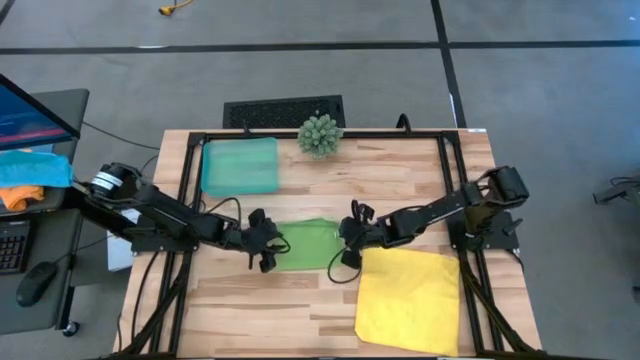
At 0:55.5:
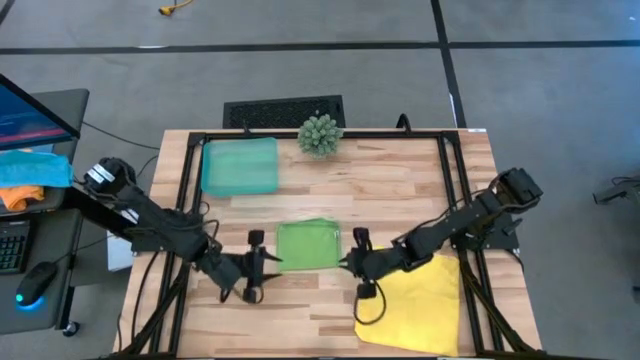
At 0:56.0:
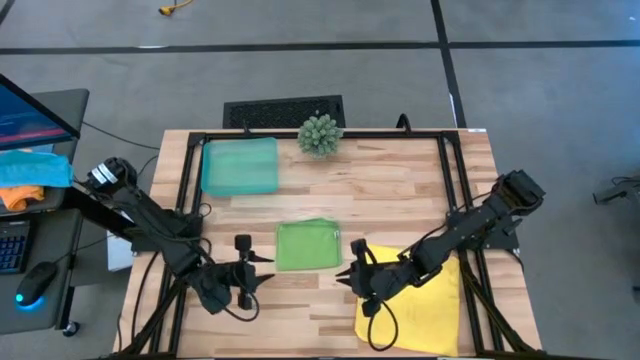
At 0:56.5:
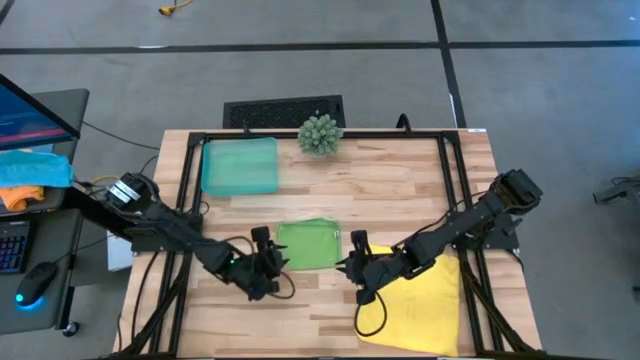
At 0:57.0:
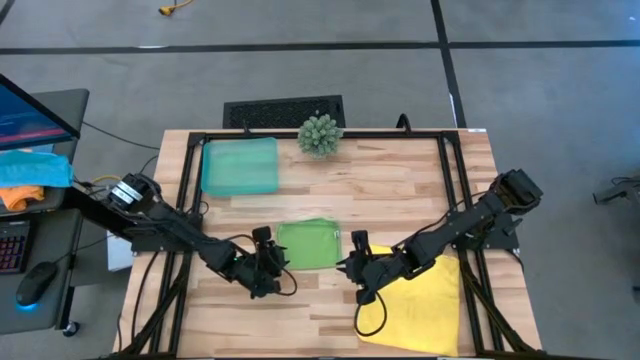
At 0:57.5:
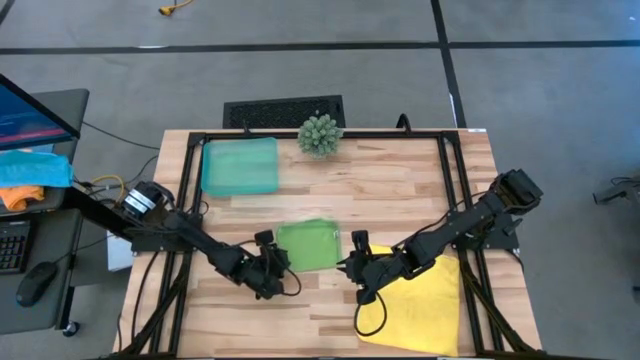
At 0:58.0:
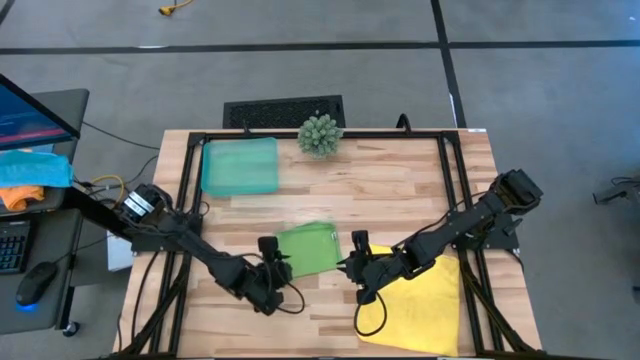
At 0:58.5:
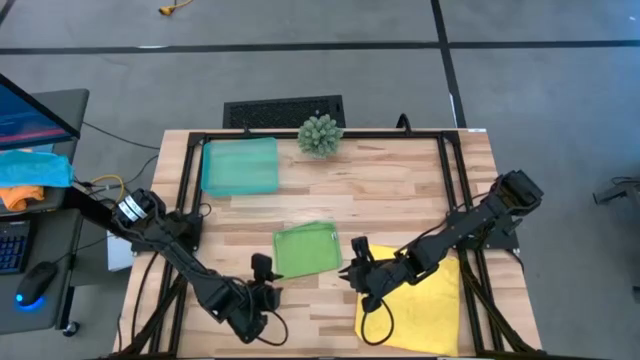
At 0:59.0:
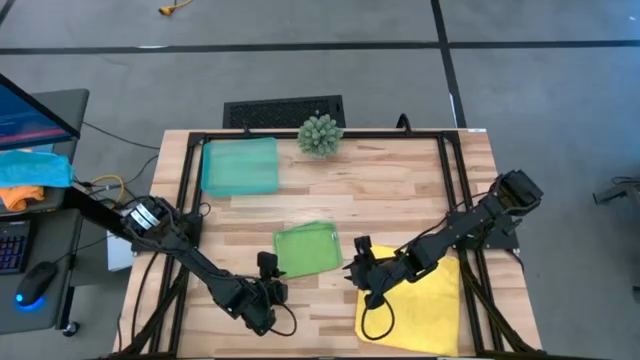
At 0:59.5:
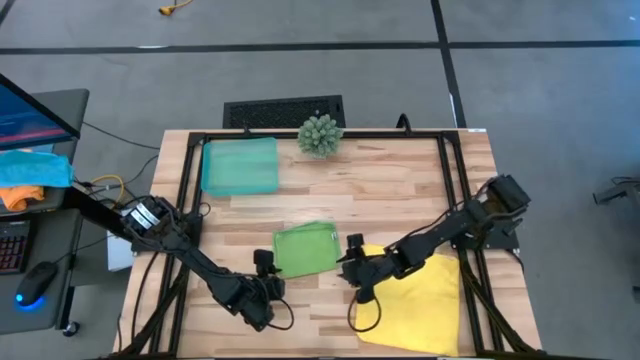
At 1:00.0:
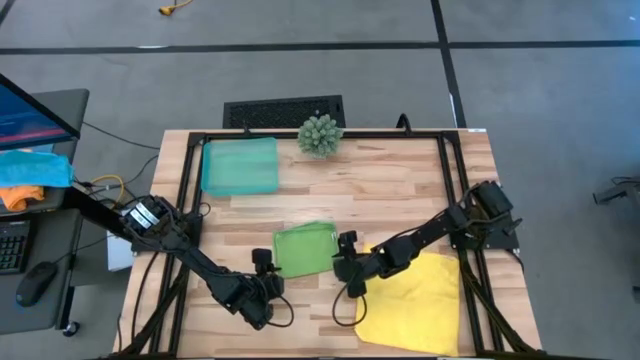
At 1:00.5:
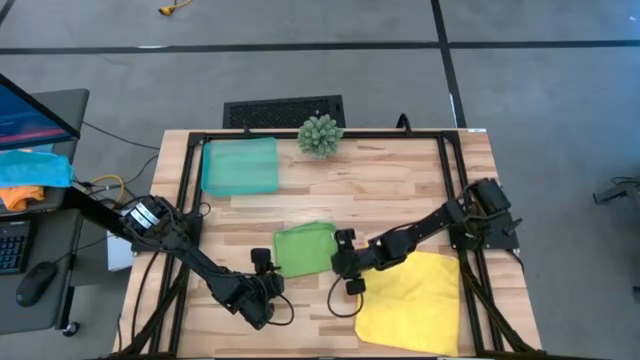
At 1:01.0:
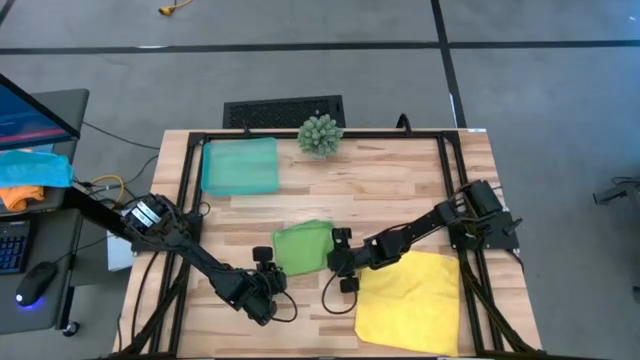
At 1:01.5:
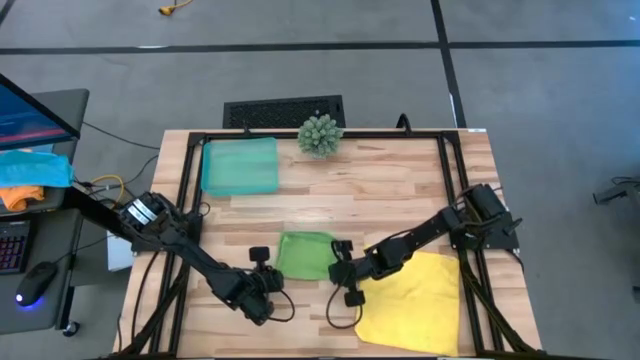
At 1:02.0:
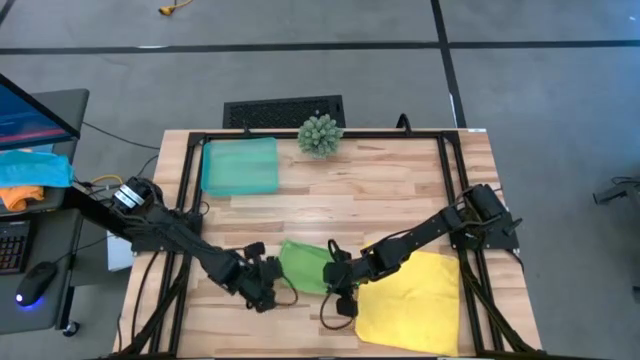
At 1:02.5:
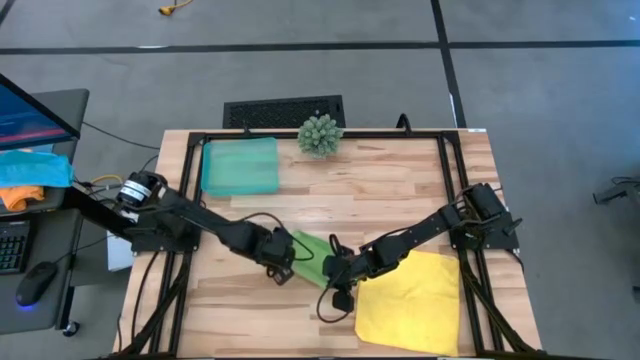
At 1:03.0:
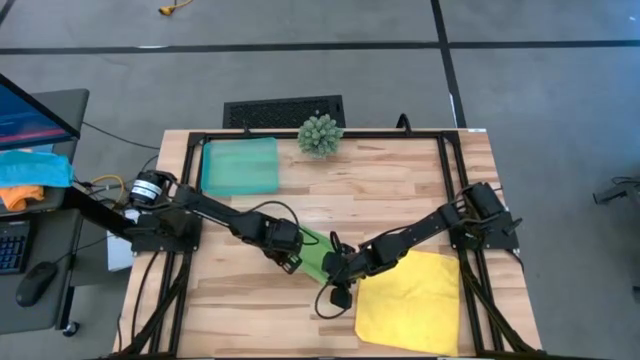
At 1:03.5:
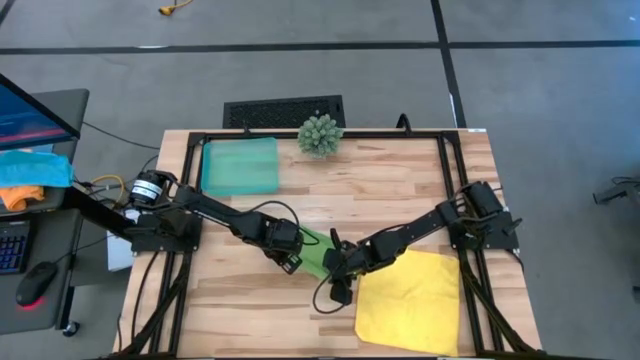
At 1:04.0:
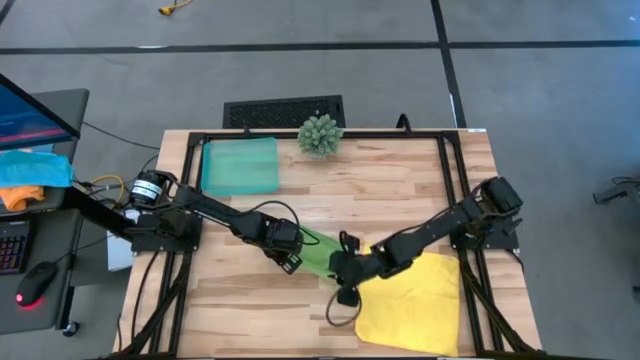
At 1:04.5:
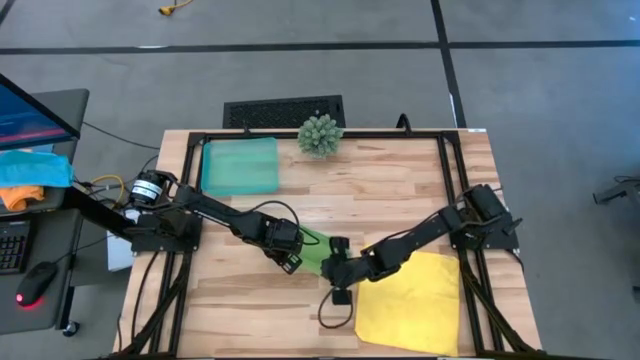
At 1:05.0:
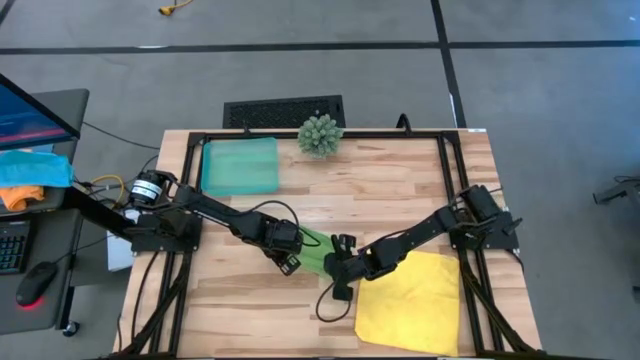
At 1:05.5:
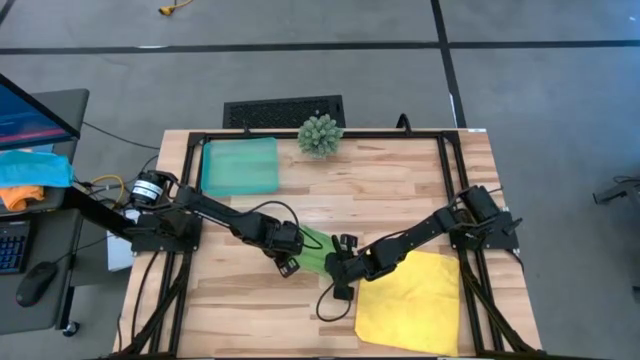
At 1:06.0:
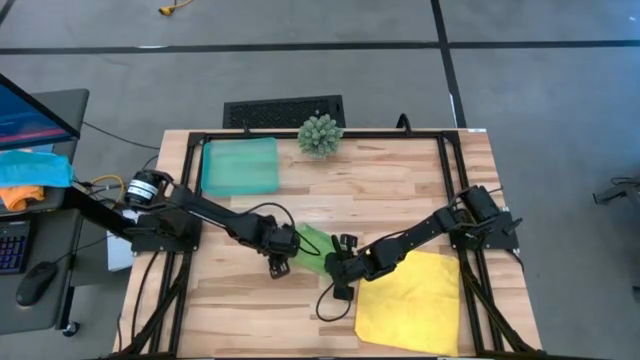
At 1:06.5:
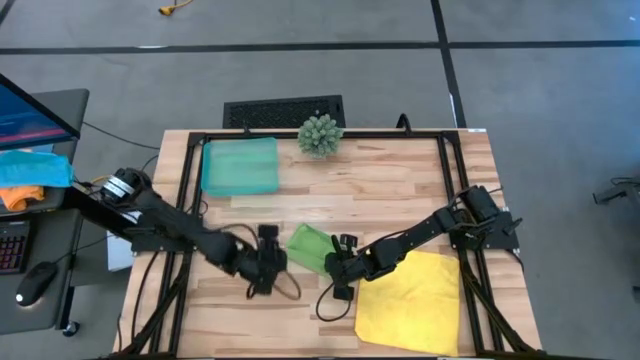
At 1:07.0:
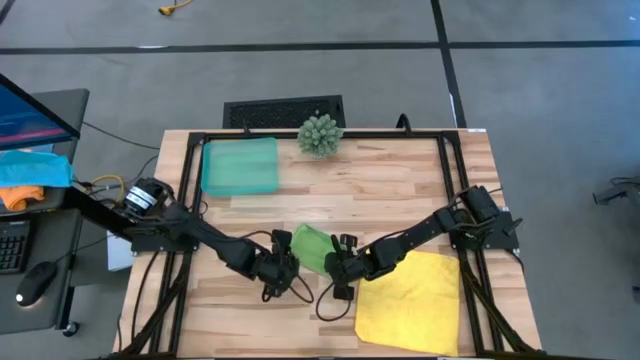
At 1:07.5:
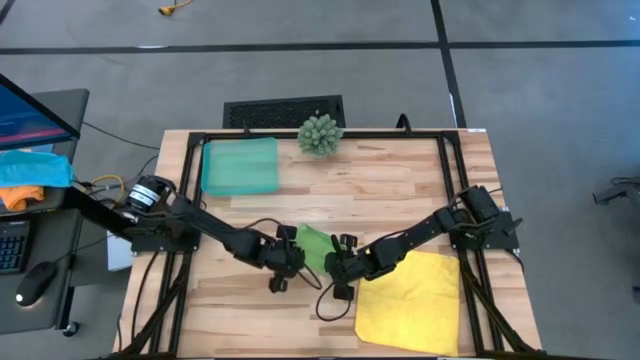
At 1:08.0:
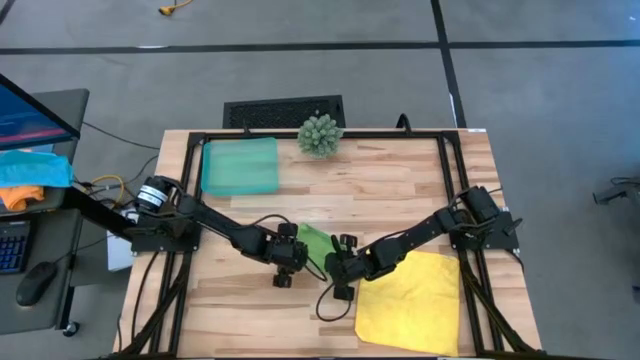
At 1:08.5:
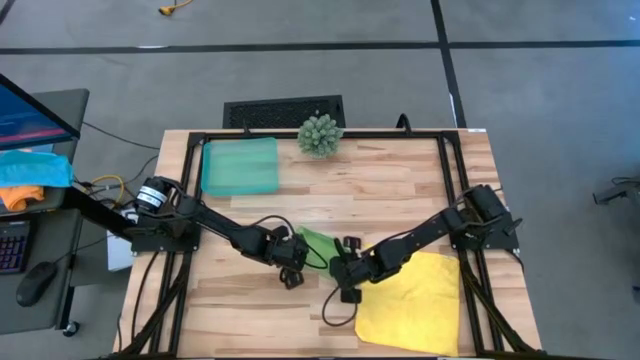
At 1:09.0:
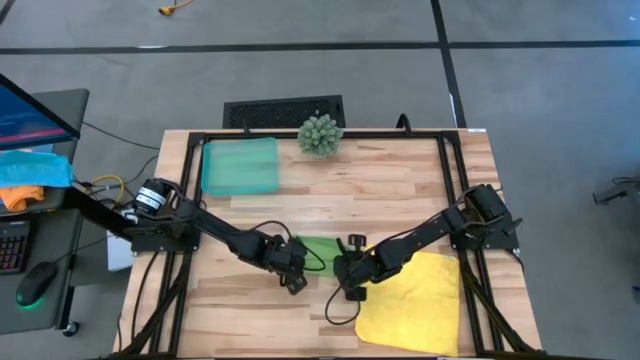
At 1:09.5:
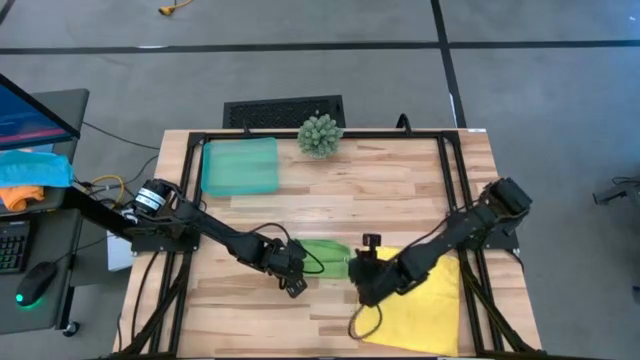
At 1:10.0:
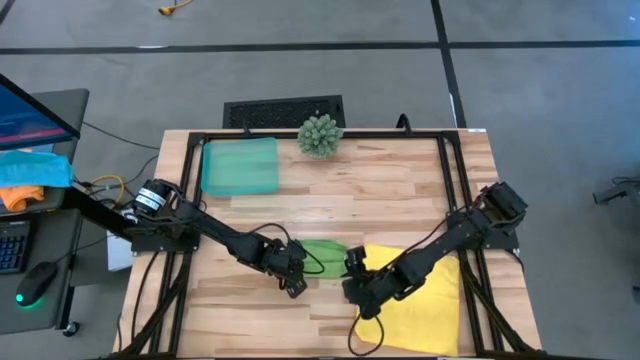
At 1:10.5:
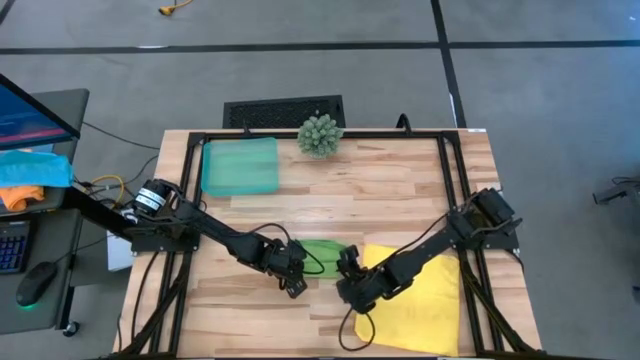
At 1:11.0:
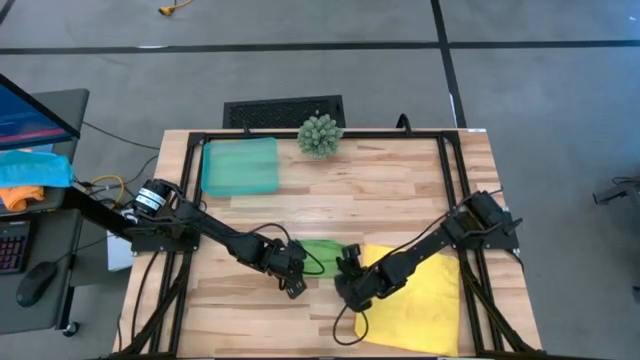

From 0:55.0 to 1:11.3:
Task: Roll microfiber towels into tight, uniform cylinder then place into a basket
Roll the green towel

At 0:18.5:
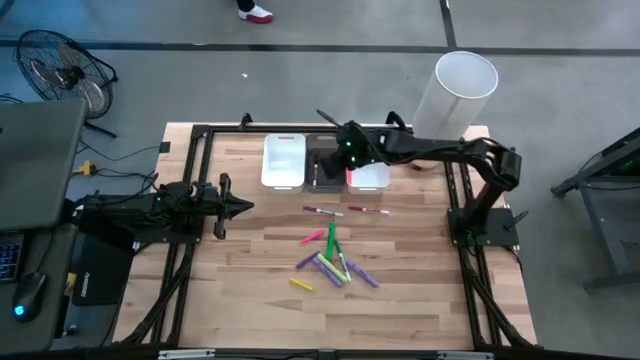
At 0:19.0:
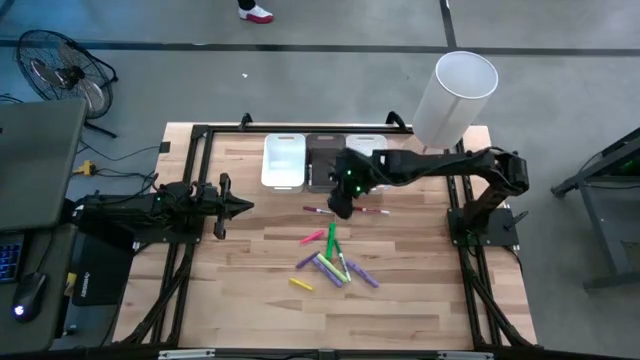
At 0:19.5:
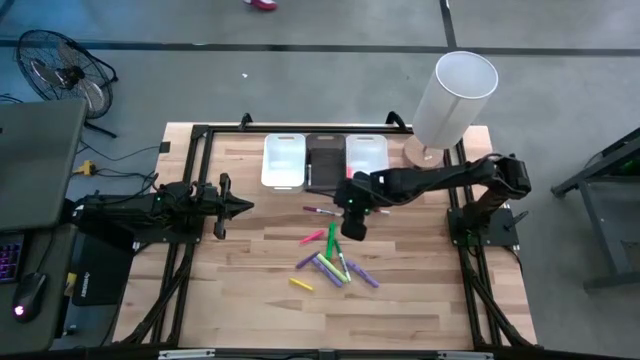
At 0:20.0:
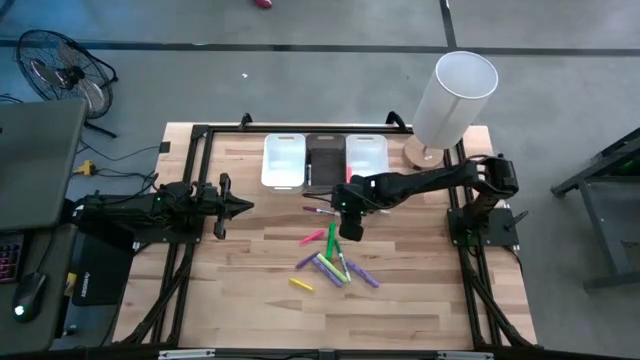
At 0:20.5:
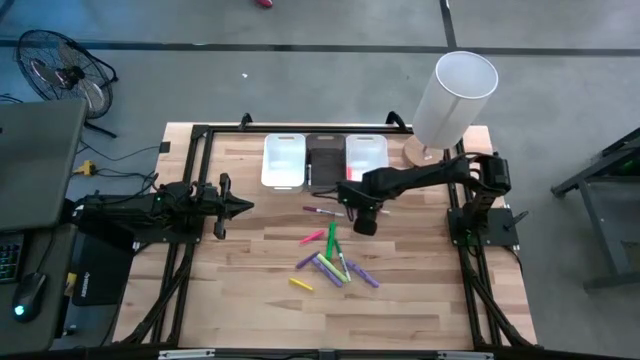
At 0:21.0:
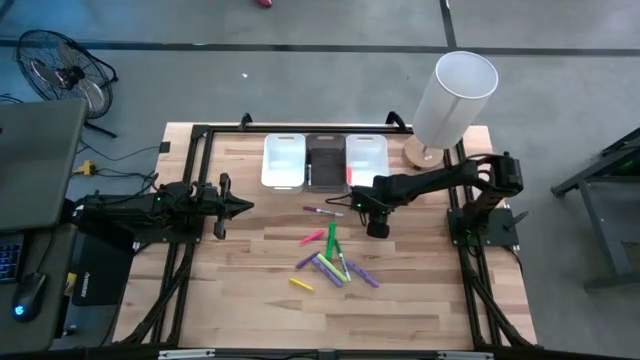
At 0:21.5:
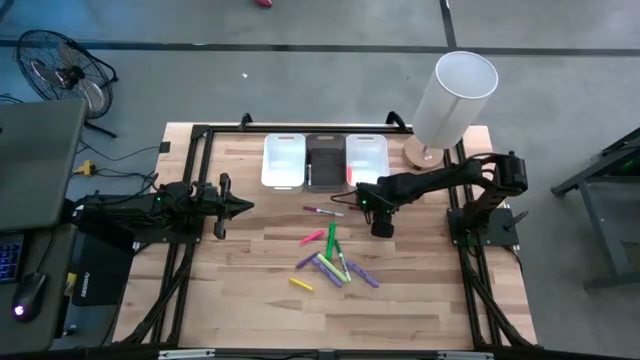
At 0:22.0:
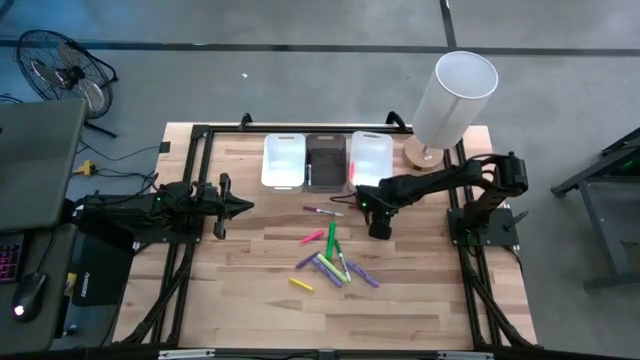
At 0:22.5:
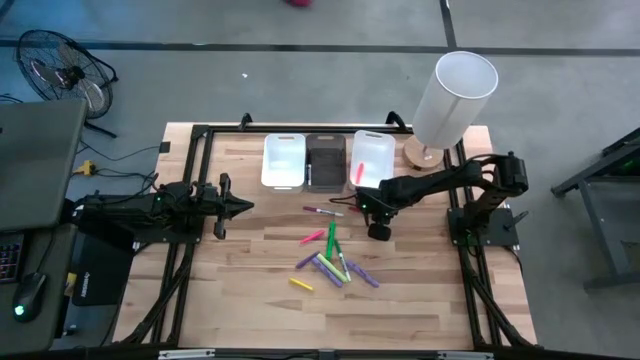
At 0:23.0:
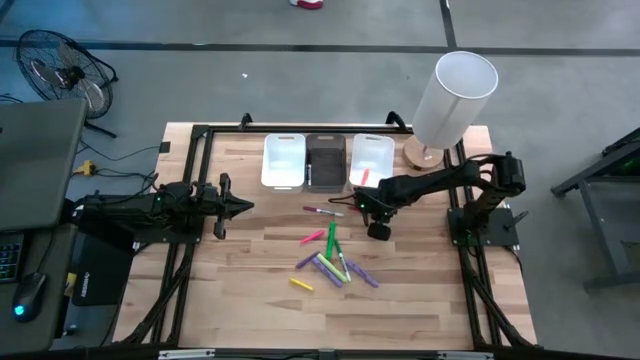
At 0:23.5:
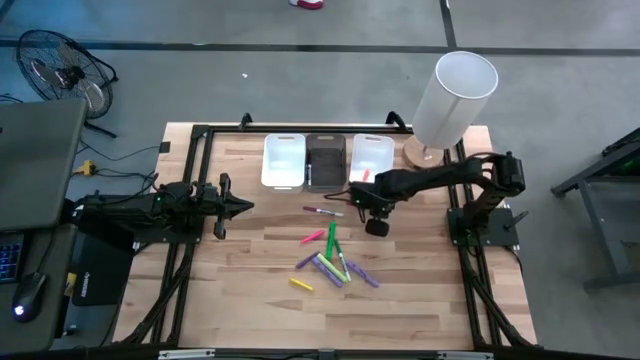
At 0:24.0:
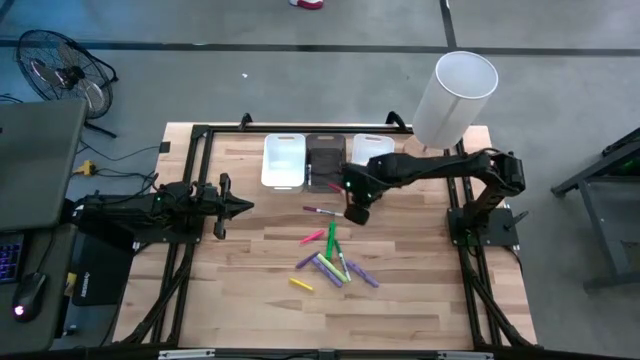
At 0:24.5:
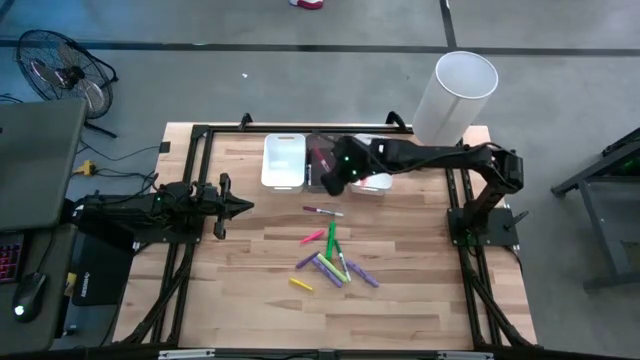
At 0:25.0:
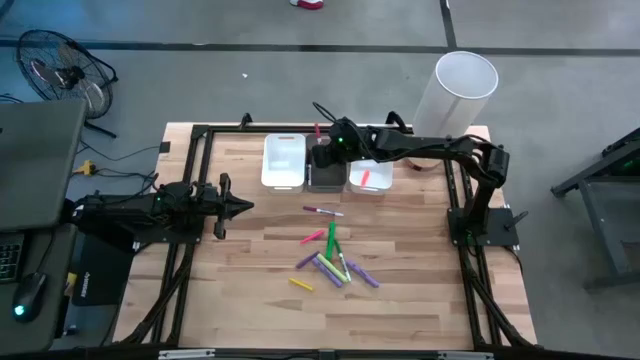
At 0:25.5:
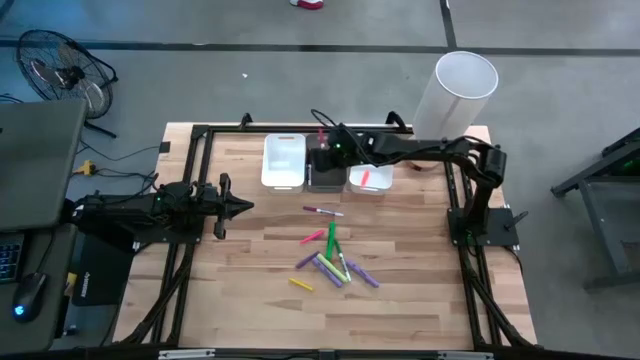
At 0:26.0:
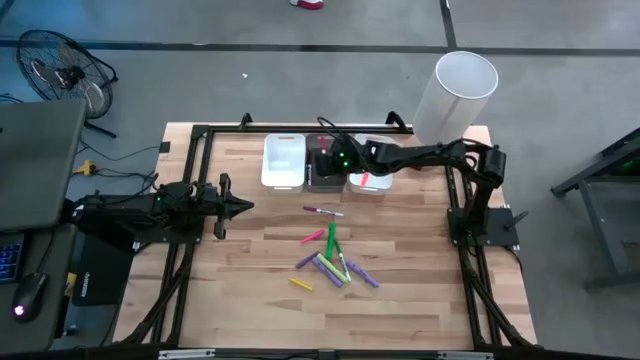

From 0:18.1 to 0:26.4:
Task: Pick & Place Markers
Put the red marker pen into the black bin
